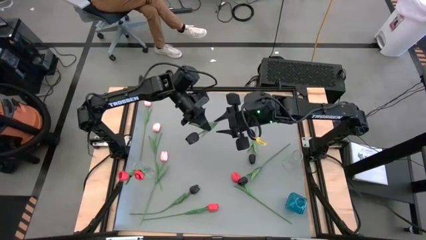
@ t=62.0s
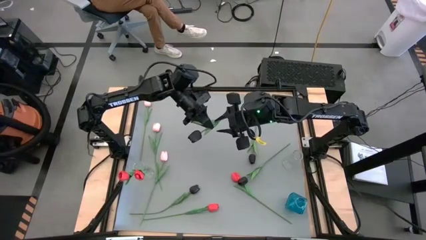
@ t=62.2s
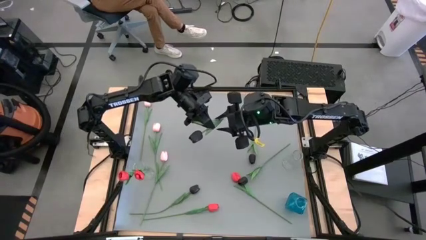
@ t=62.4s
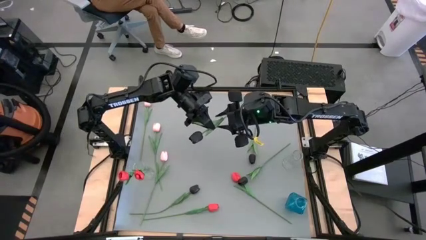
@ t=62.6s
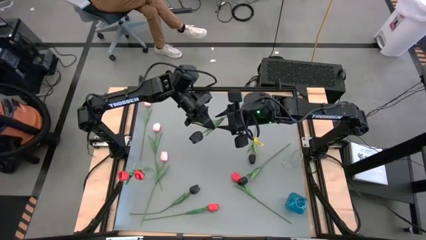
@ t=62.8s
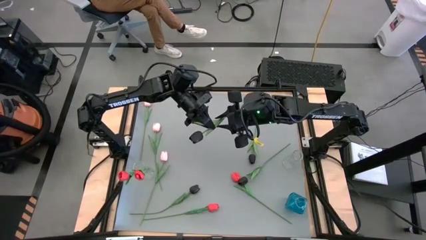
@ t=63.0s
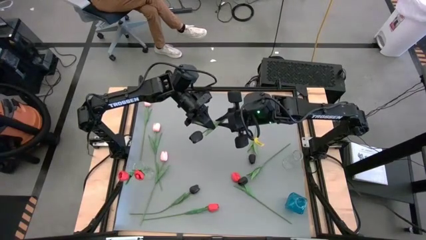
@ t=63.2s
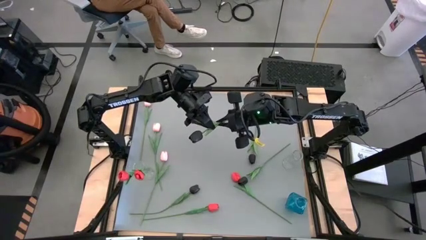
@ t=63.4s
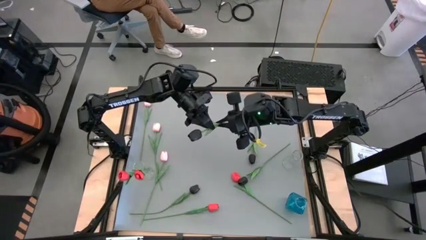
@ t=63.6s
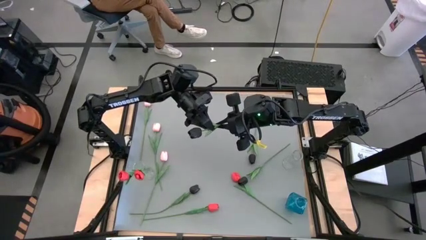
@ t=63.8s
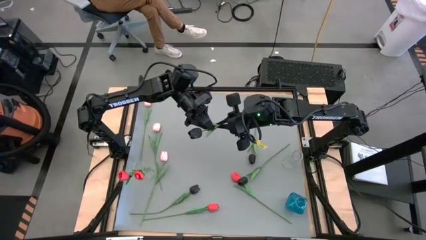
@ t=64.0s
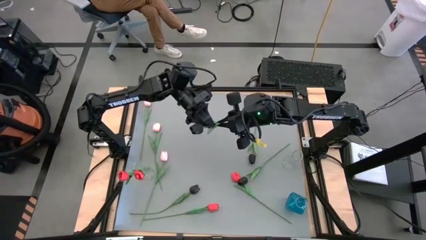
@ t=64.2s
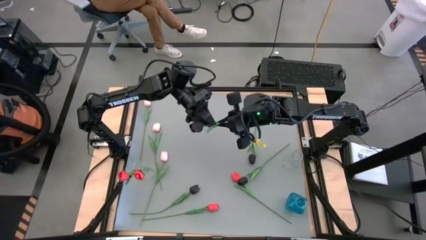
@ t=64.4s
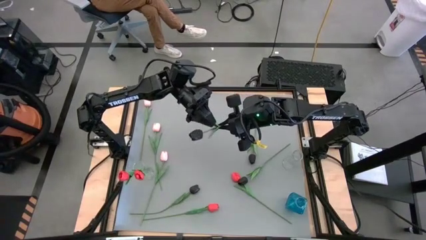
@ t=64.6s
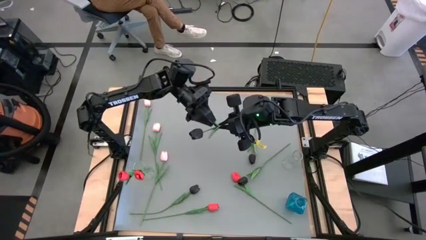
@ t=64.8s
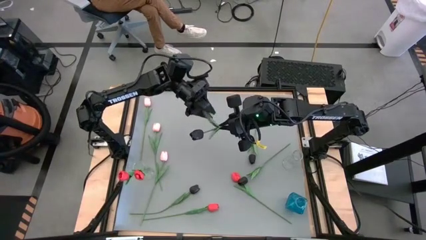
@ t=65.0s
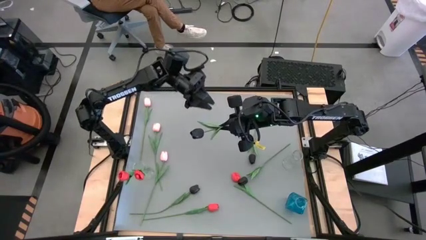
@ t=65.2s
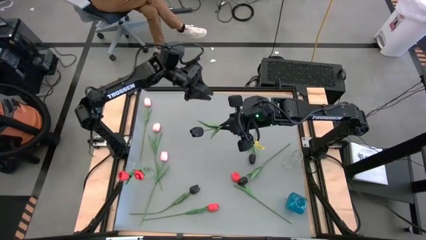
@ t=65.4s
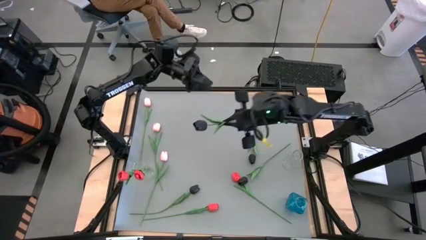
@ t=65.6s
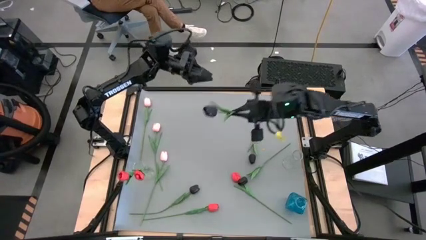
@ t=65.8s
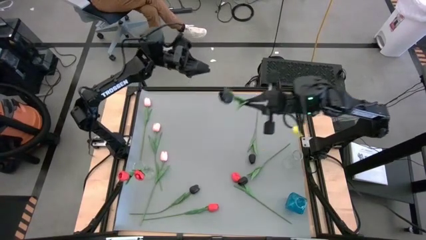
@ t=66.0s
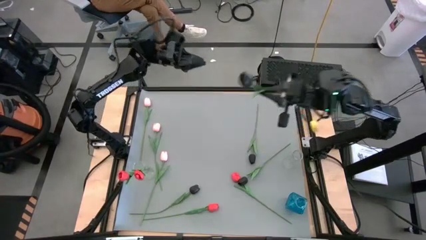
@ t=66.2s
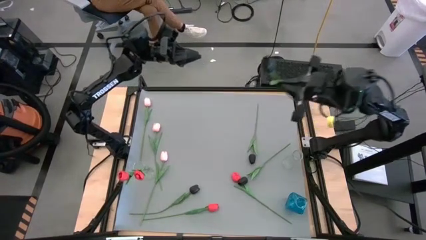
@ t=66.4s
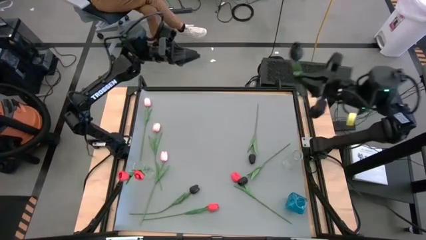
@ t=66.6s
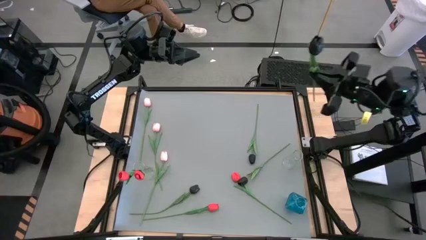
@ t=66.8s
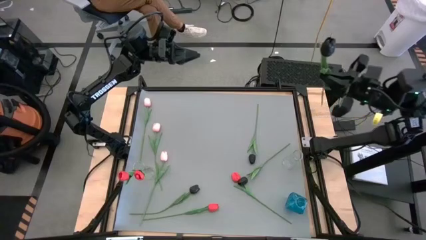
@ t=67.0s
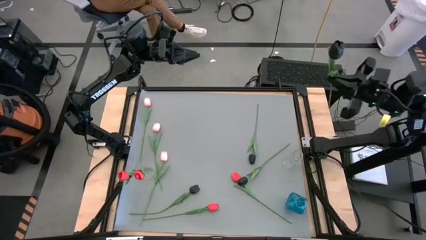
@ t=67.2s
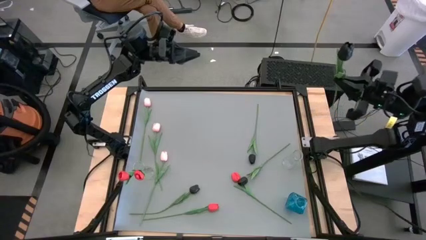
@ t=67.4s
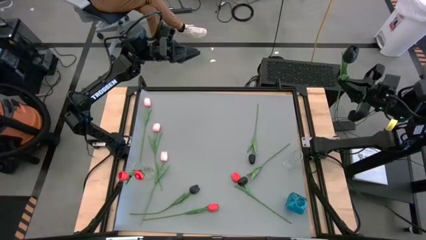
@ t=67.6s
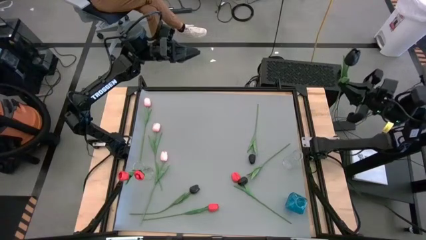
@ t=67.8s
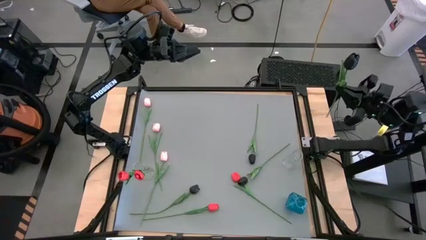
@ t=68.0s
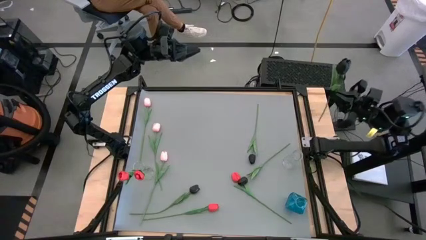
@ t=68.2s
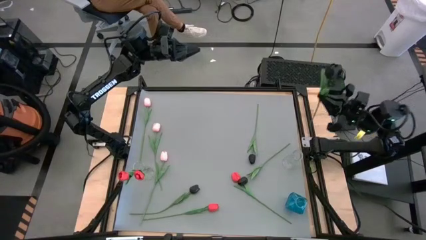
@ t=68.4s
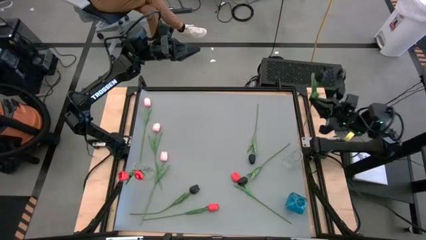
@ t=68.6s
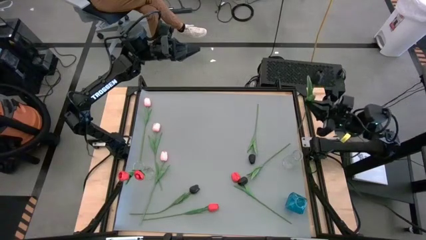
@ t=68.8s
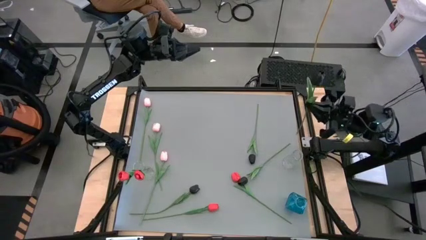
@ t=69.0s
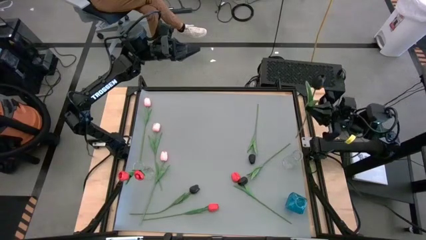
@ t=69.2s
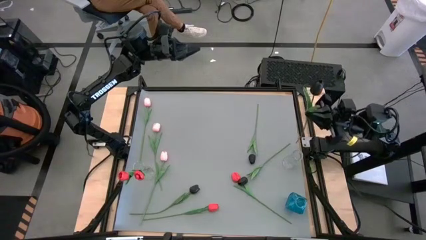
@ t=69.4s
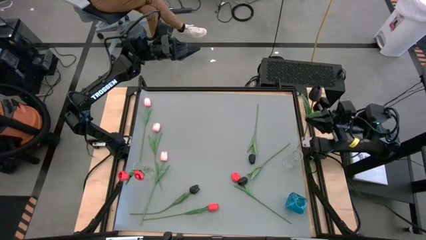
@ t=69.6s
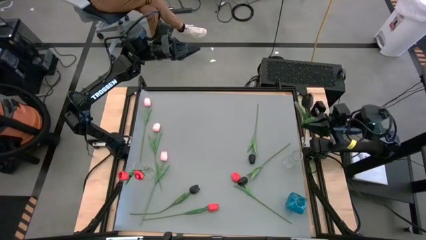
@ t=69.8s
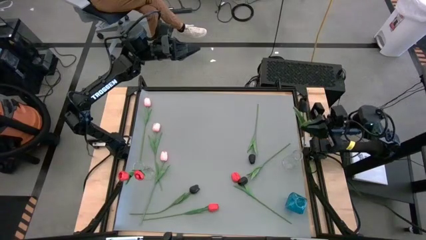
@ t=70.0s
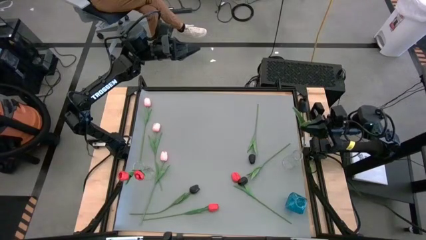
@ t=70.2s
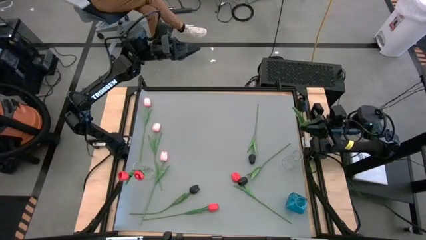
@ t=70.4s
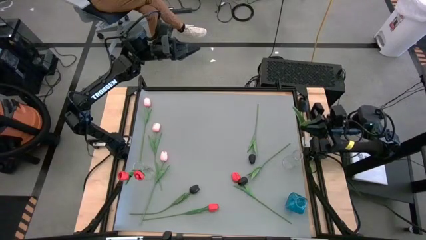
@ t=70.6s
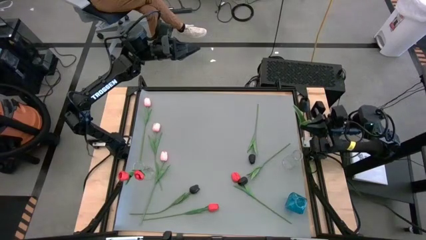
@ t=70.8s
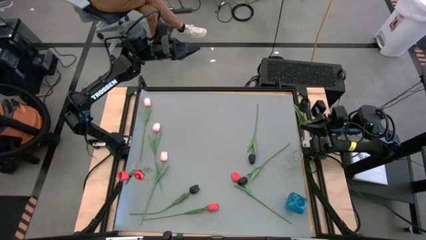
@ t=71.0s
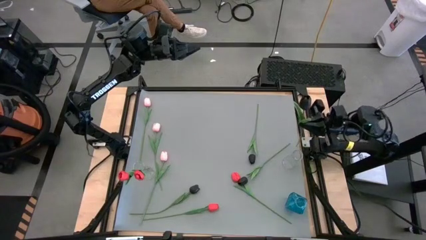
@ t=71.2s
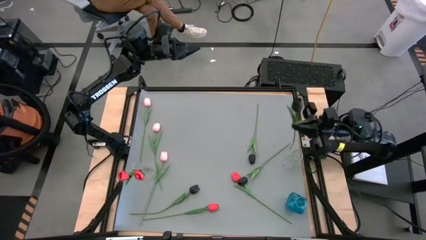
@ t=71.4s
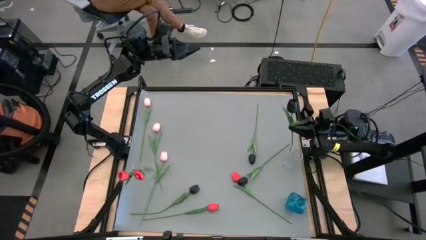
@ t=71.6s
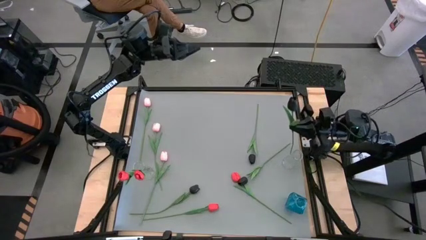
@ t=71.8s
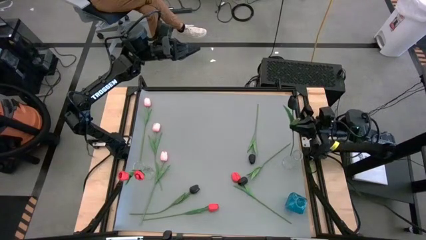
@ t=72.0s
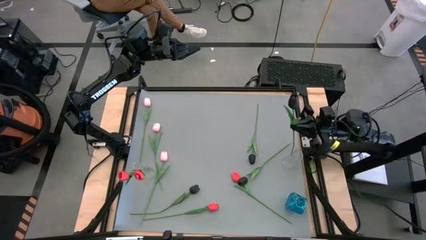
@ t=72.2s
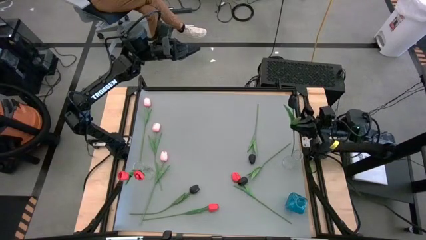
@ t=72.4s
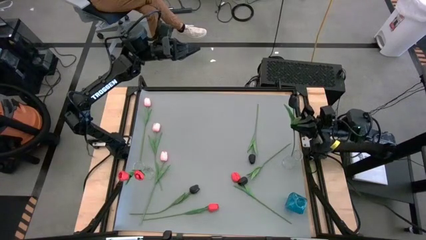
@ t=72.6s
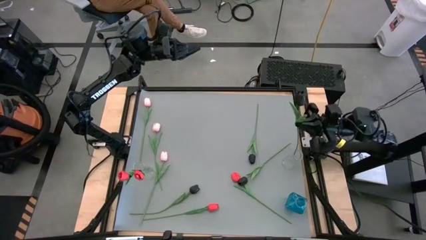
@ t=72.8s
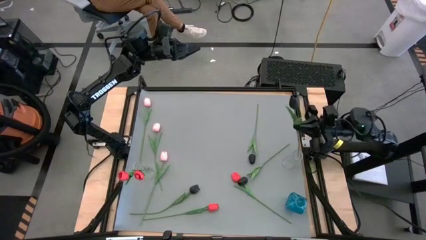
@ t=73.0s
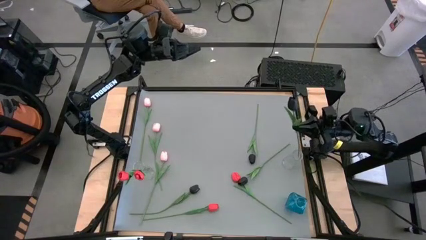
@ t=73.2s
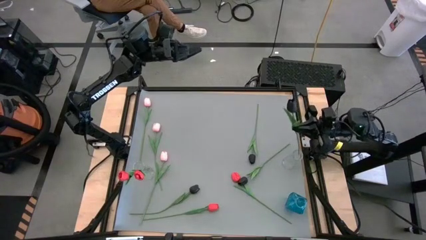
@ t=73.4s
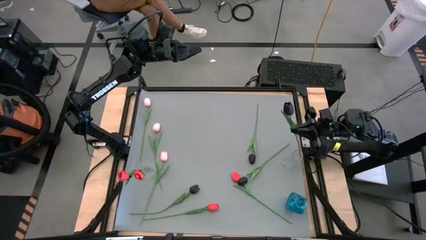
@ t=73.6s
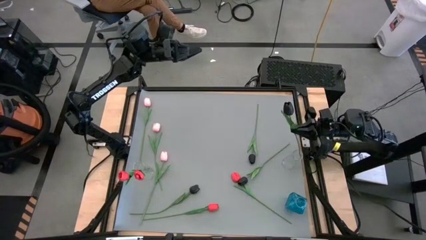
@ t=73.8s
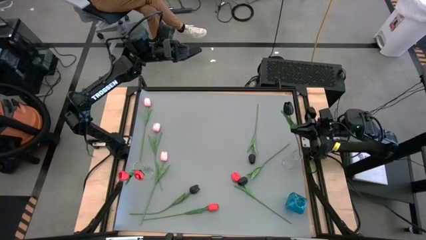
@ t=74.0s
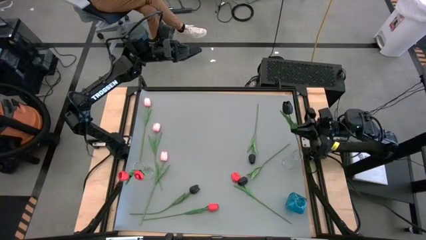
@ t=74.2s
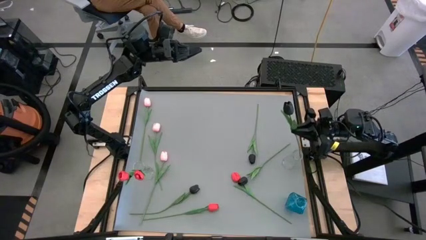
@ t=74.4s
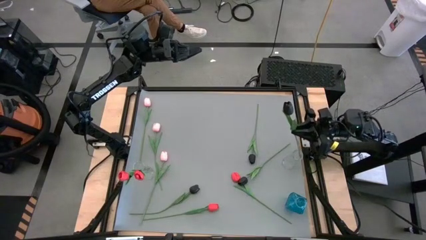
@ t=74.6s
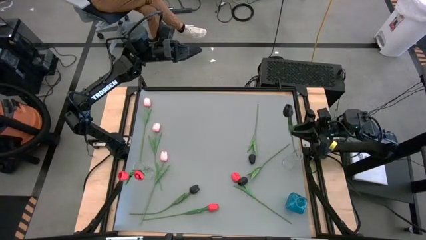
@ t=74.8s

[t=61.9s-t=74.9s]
Task: Sort flowers into vase by color
Put the top left black tulip into the right transparent vase
